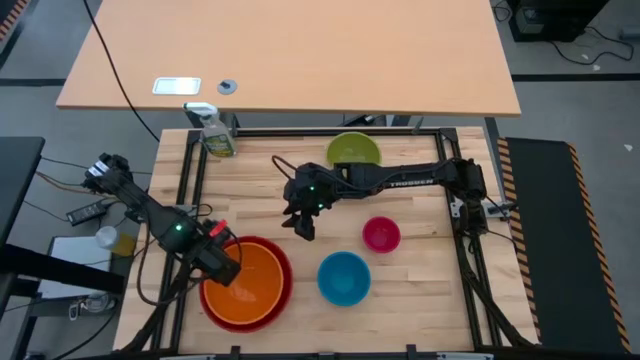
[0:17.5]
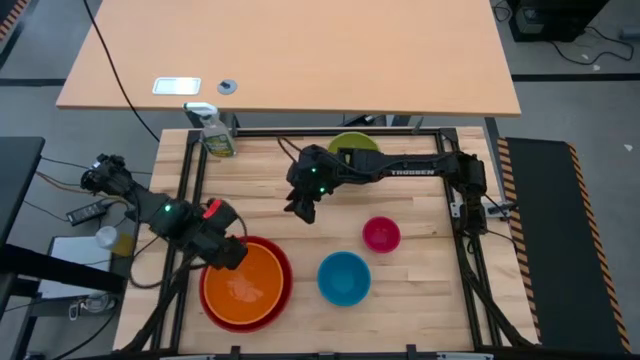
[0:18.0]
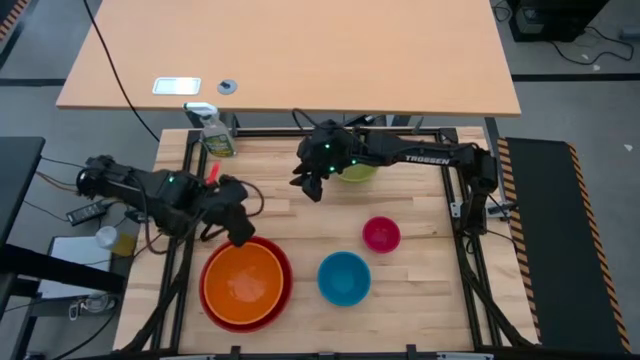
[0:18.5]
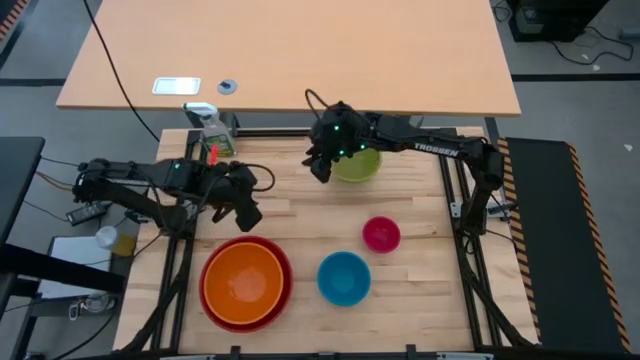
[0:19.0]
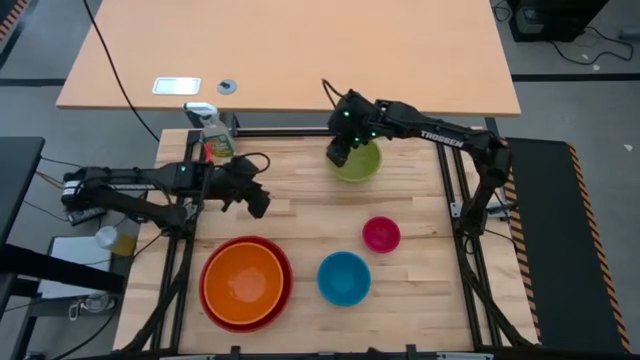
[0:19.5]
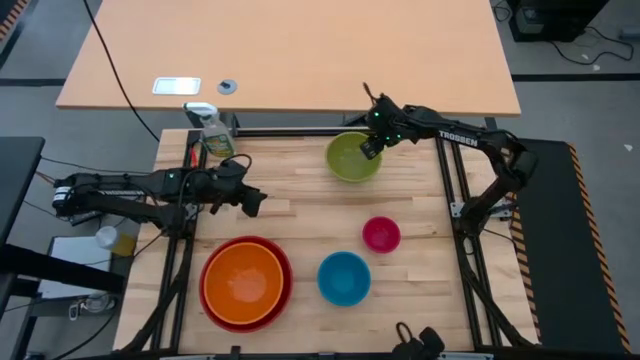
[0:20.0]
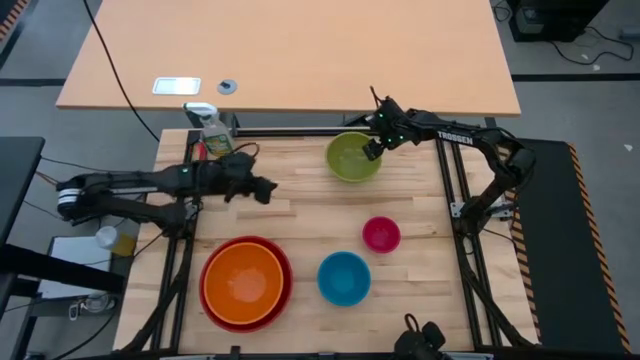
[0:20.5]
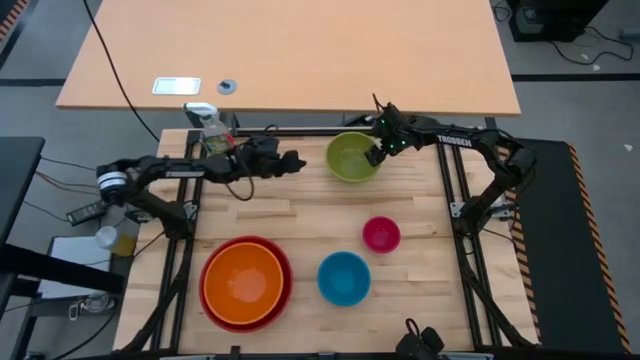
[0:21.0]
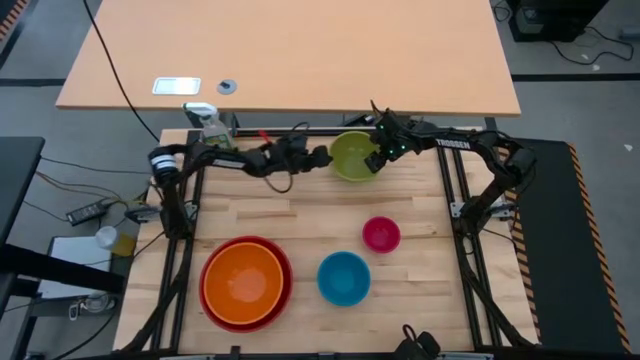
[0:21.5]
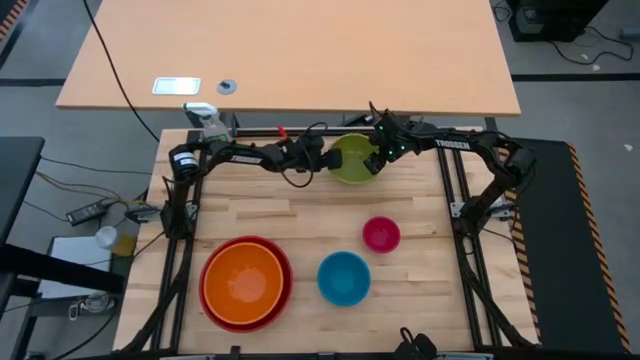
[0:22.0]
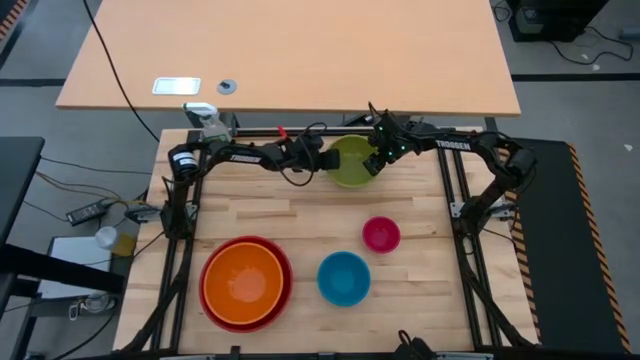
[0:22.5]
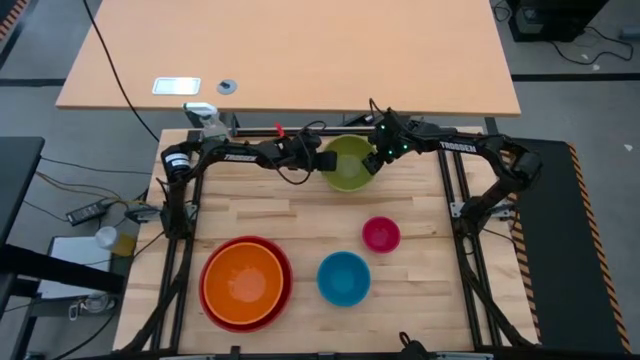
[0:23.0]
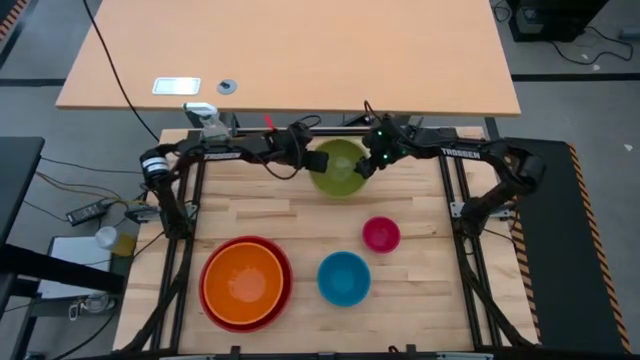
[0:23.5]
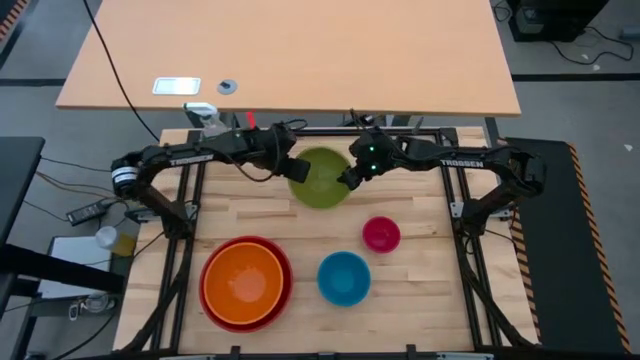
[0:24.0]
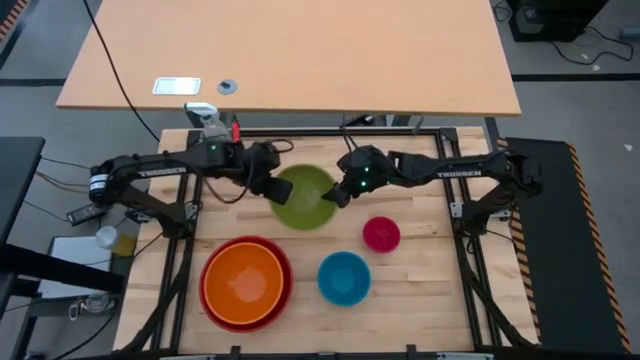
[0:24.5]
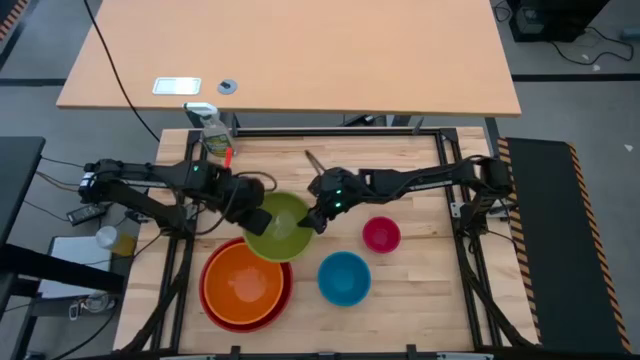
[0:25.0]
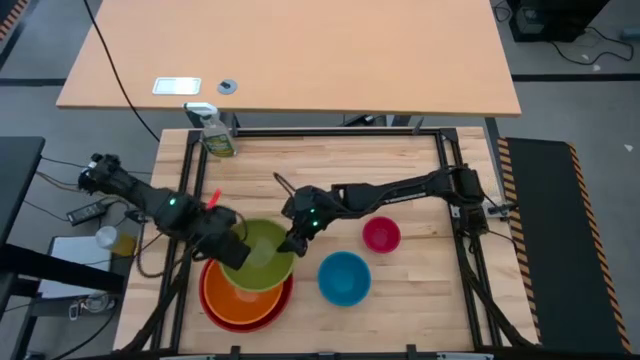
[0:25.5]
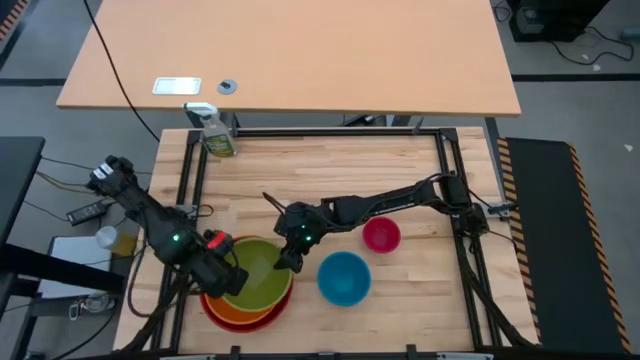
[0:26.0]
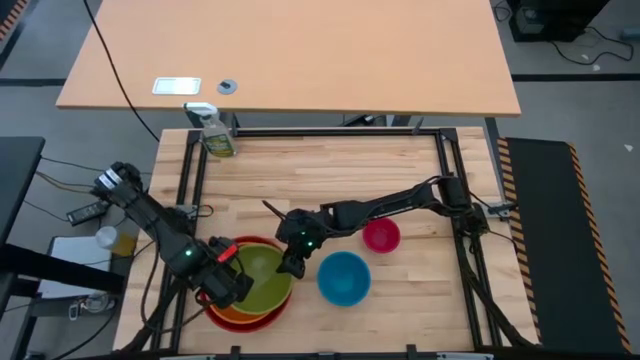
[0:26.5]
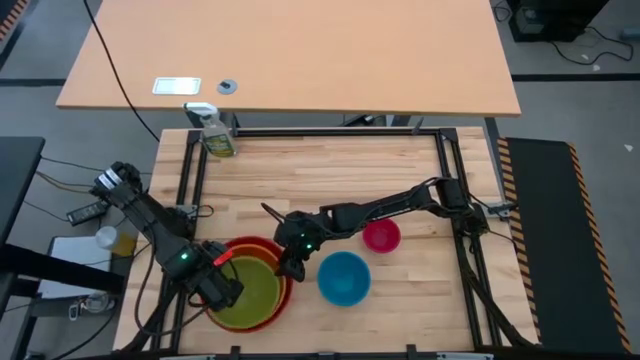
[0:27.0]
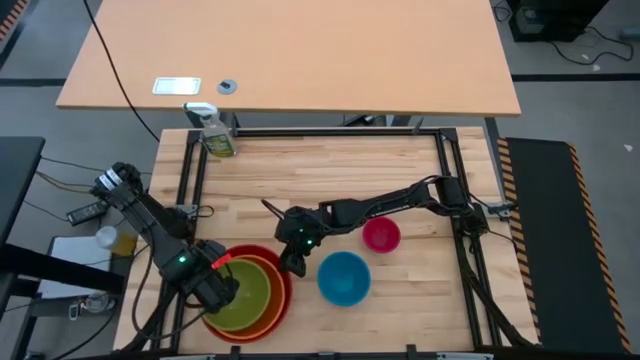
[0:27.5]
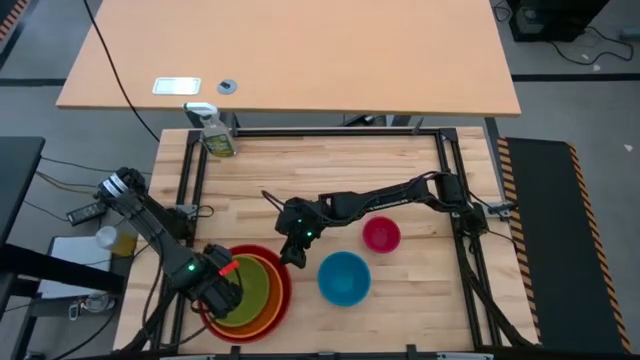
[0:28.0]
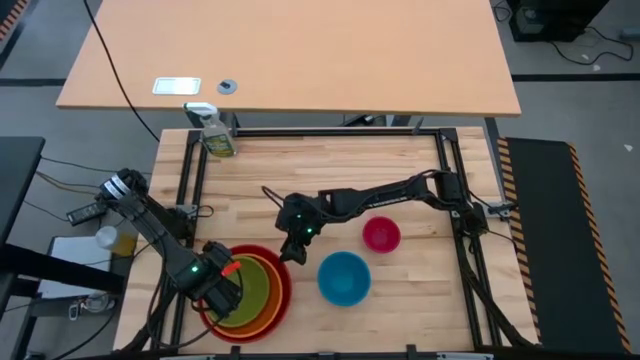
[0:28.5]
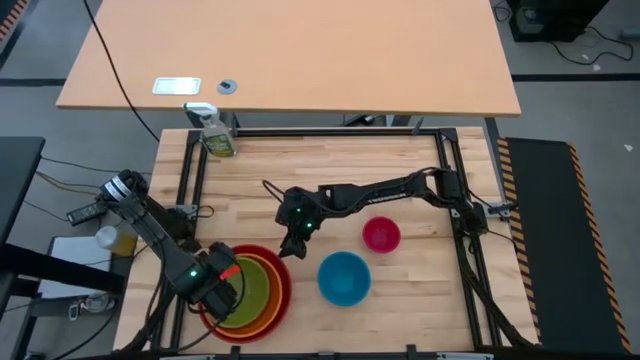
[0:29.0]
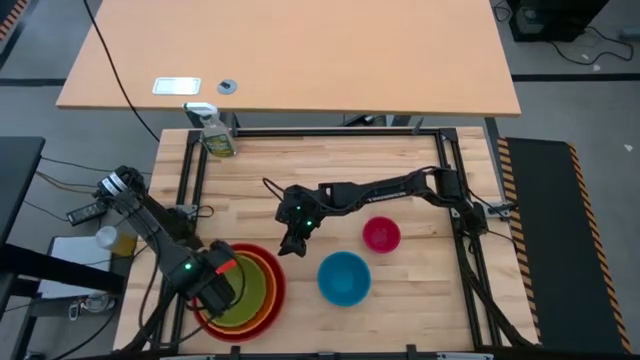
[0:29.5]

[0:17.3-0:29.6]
Stack the green bowl on top of the orange bowl

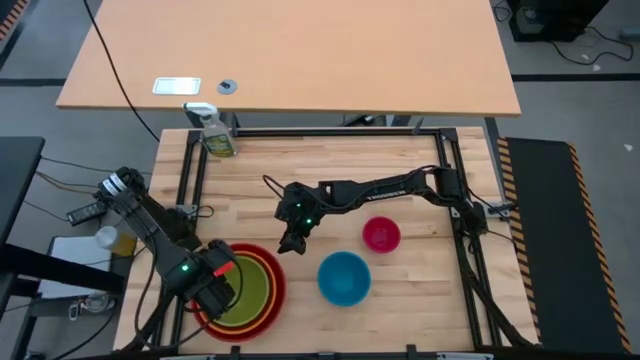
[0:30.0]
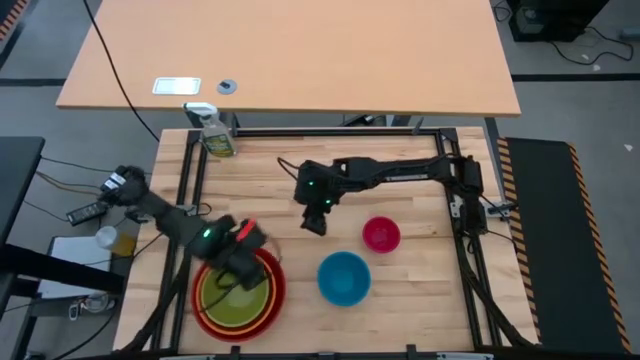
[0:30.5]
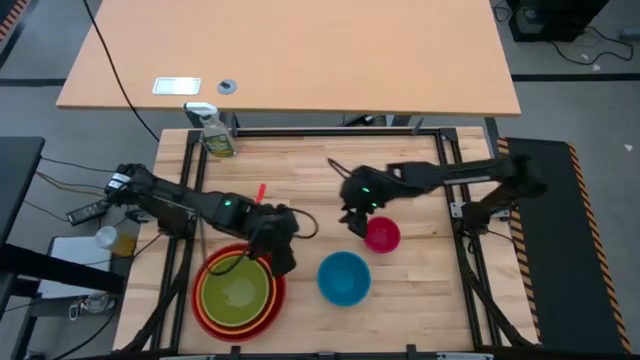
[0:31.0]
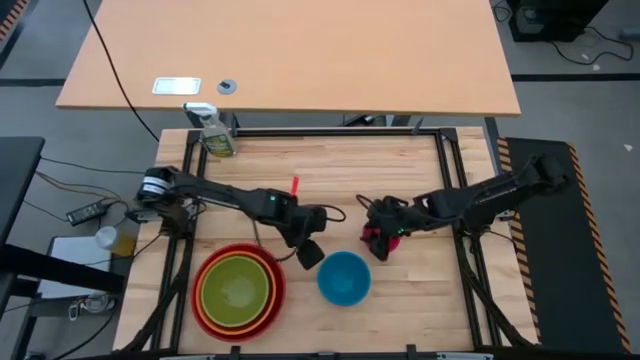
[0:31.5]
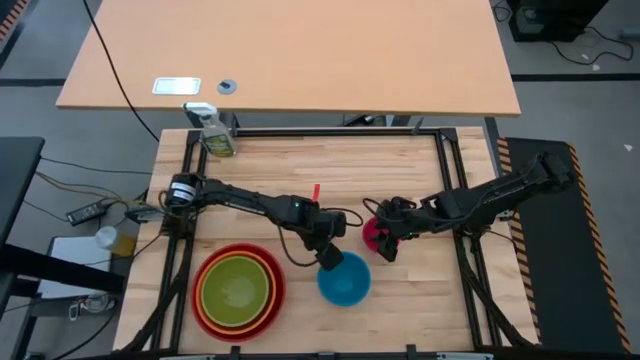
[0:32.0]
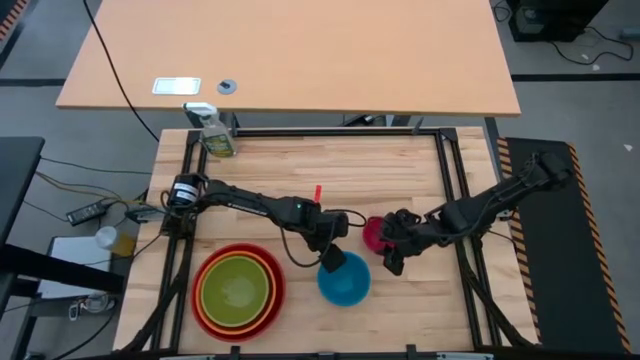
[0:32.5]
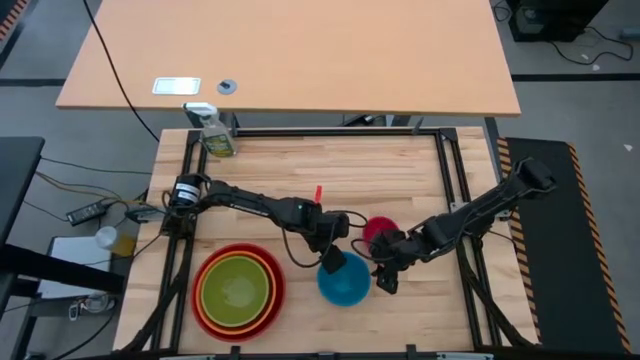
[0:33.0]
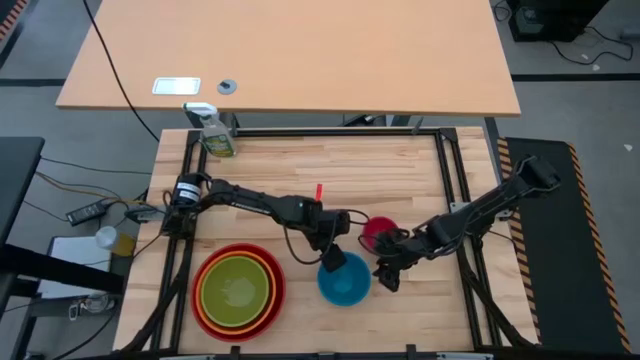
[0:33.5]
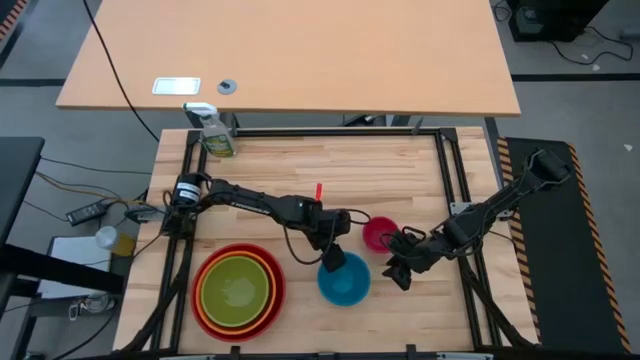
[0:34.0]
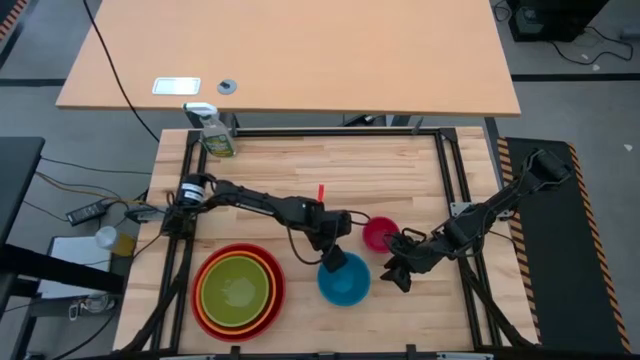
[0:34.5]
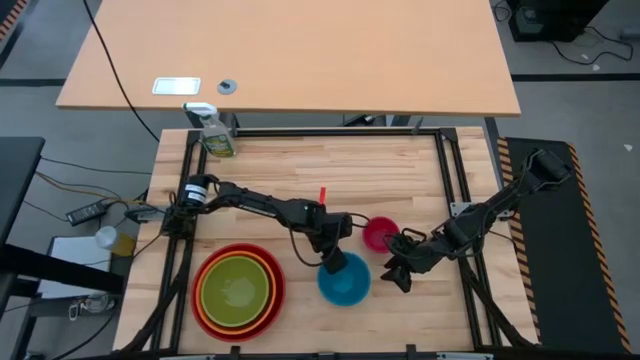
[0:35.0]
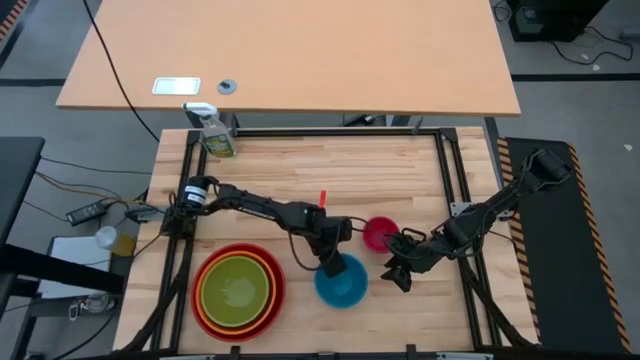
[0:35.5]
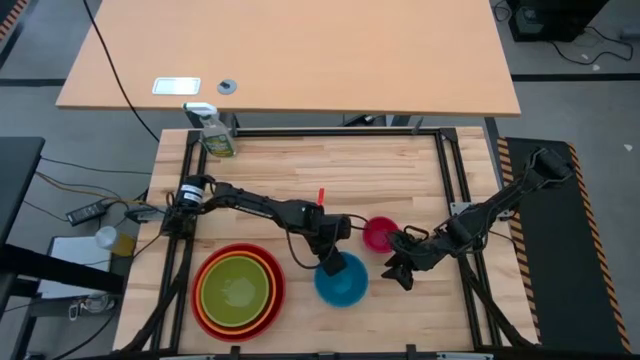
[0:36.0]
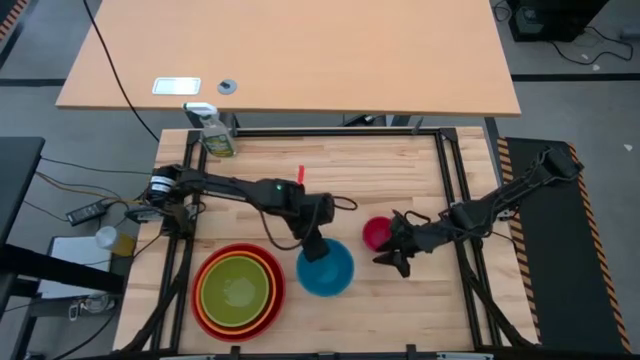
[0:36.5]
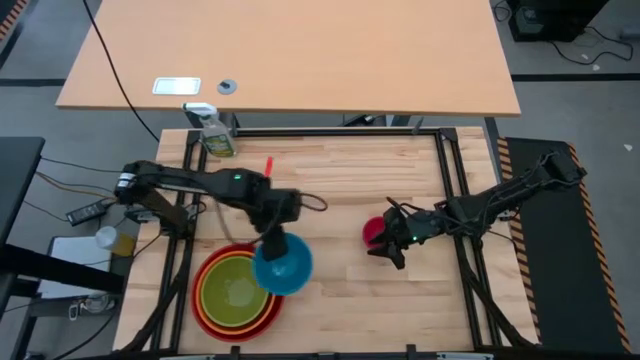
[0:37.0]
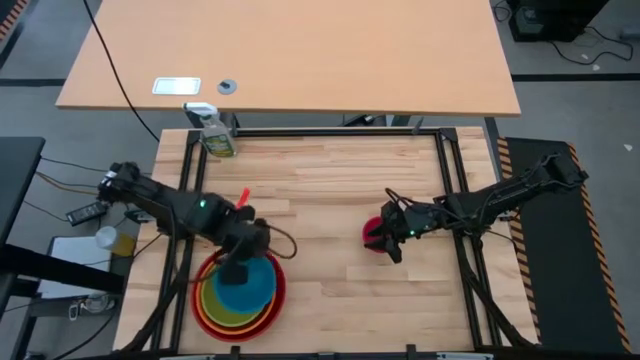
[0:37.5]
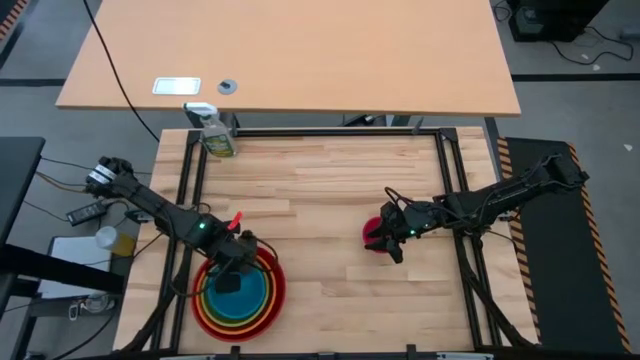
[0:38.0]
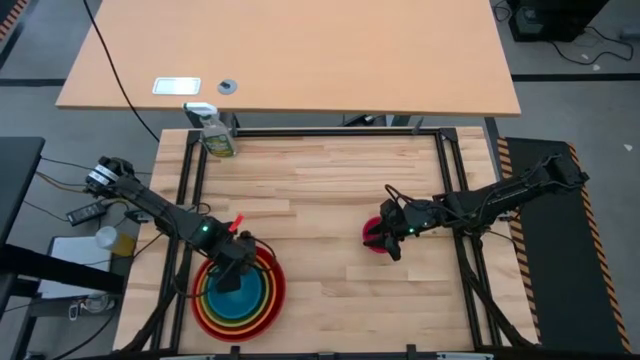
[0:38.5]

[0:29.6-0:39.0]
Stack the blue bowl on top of the green bowl
